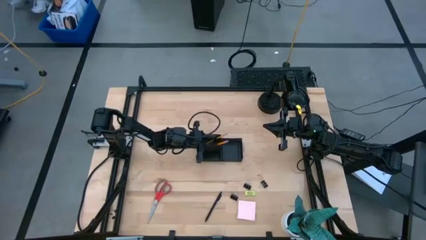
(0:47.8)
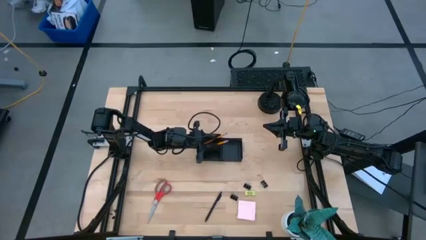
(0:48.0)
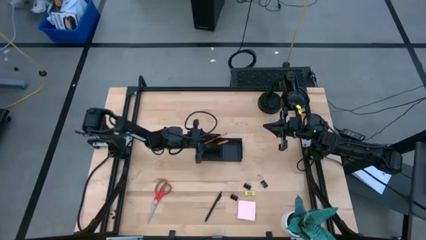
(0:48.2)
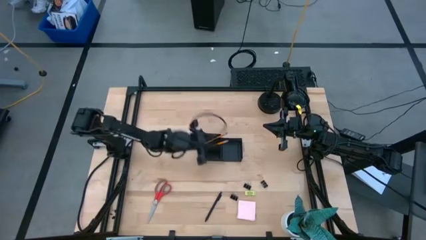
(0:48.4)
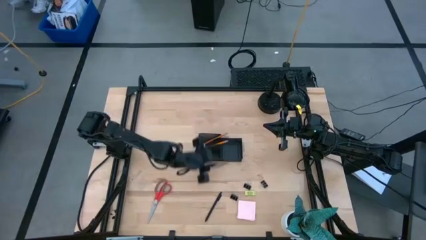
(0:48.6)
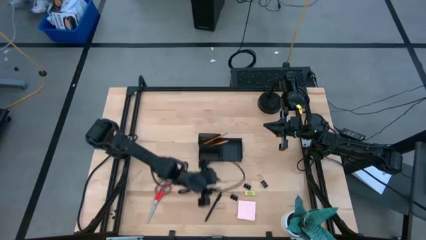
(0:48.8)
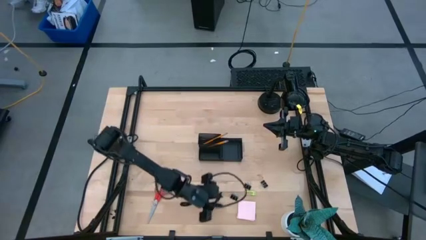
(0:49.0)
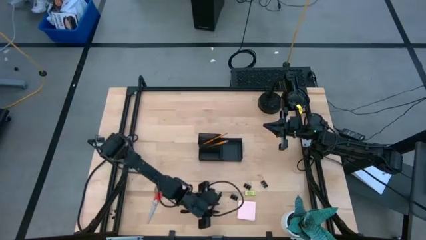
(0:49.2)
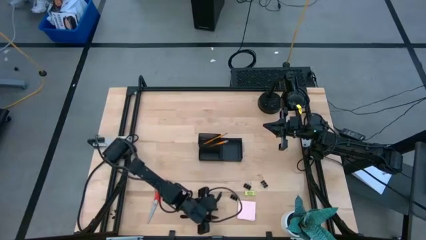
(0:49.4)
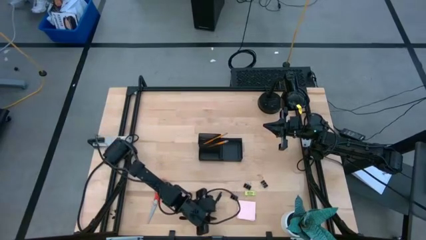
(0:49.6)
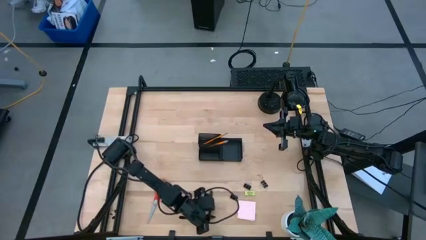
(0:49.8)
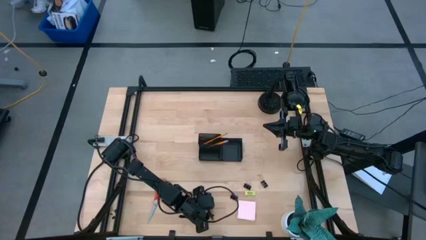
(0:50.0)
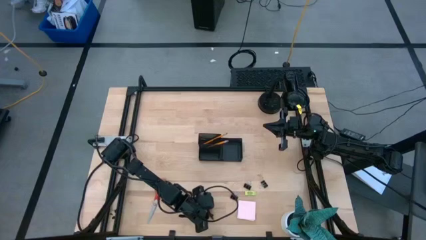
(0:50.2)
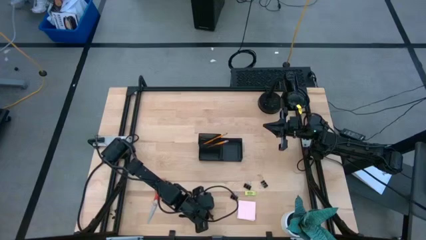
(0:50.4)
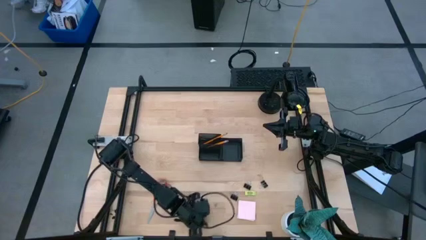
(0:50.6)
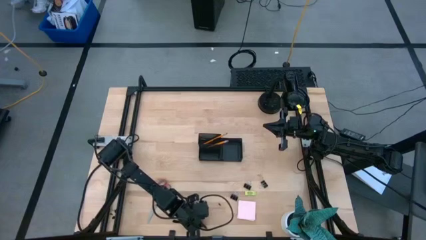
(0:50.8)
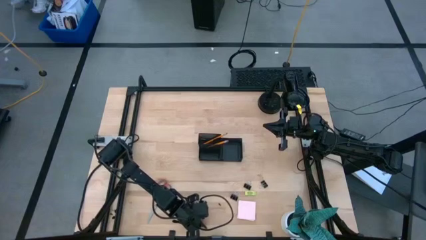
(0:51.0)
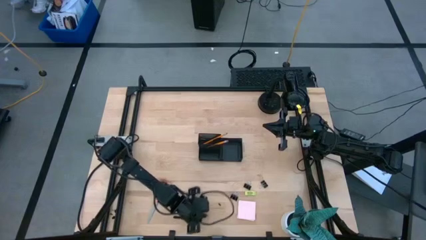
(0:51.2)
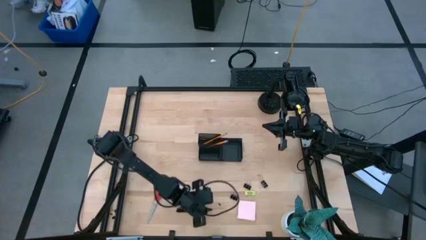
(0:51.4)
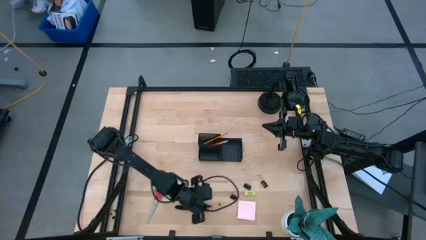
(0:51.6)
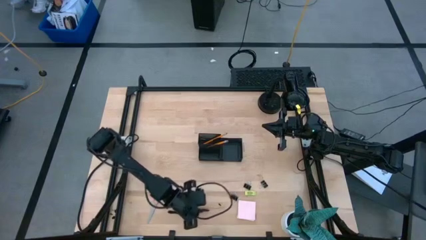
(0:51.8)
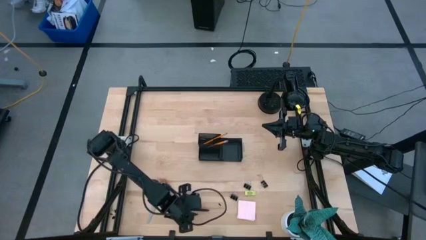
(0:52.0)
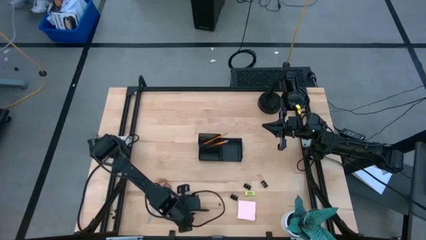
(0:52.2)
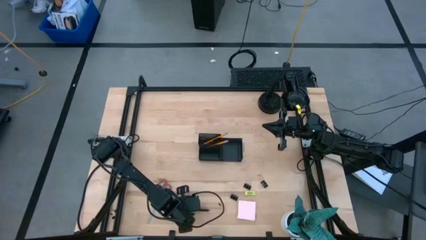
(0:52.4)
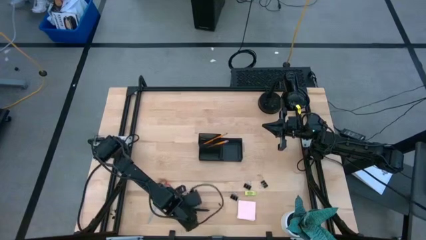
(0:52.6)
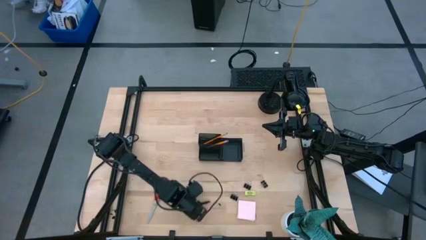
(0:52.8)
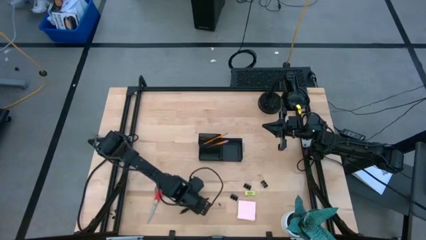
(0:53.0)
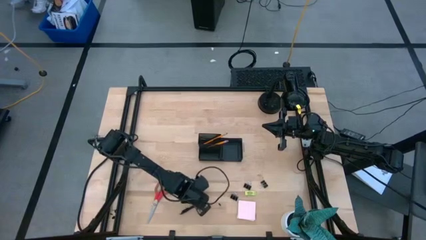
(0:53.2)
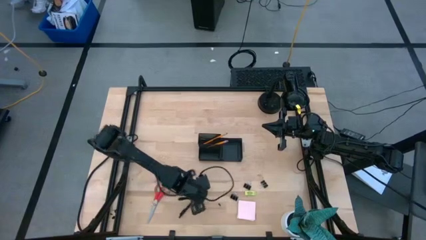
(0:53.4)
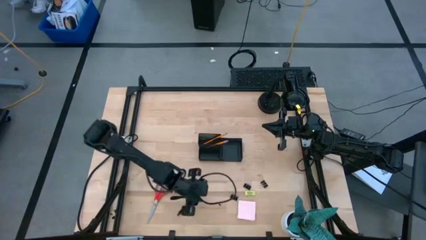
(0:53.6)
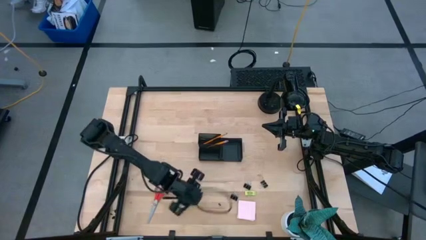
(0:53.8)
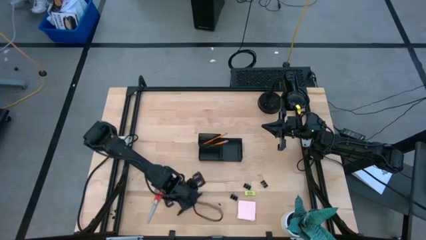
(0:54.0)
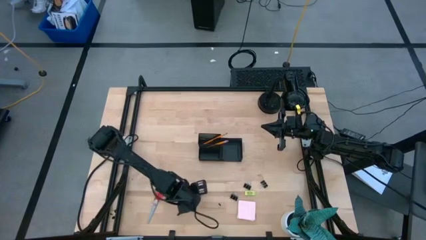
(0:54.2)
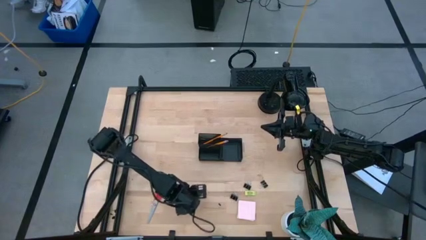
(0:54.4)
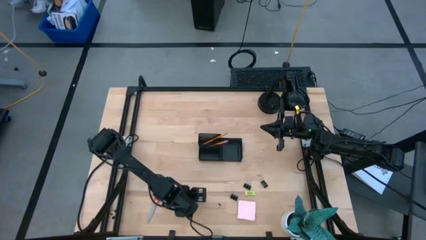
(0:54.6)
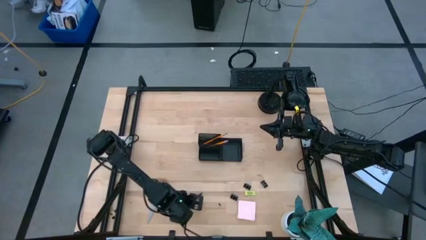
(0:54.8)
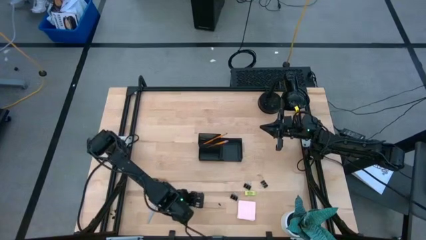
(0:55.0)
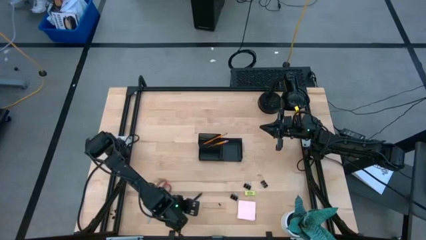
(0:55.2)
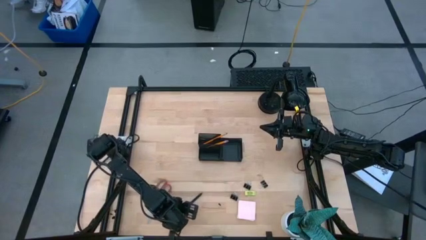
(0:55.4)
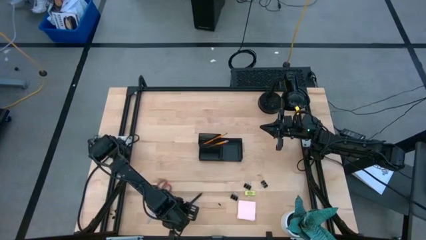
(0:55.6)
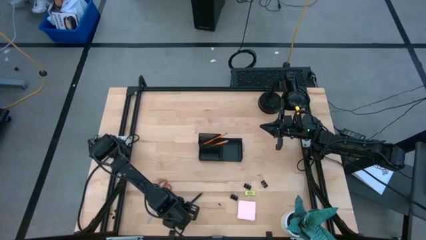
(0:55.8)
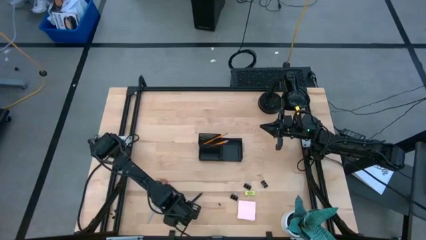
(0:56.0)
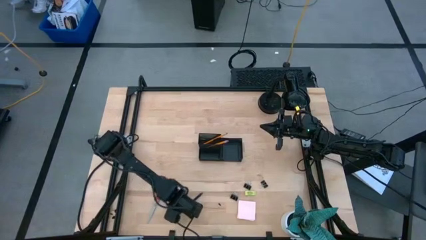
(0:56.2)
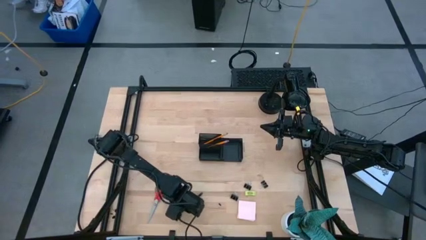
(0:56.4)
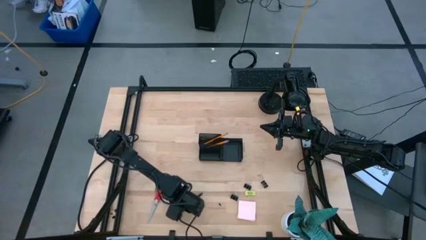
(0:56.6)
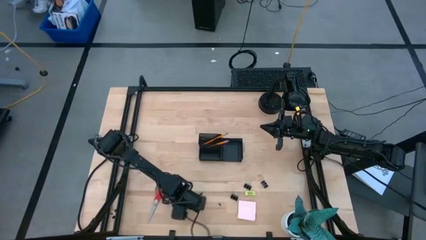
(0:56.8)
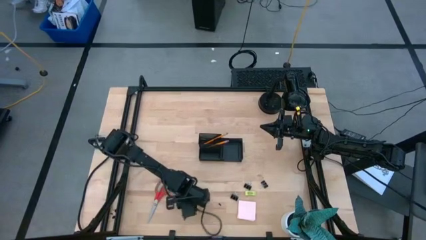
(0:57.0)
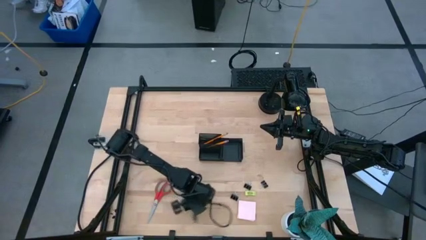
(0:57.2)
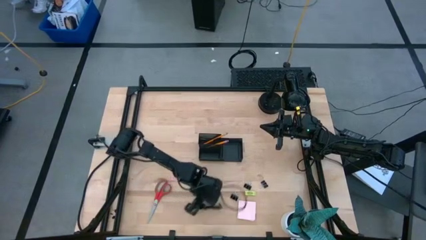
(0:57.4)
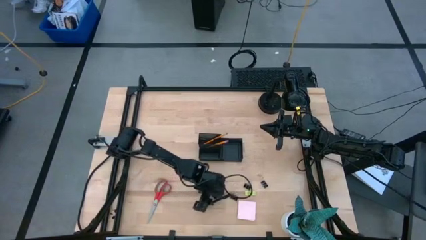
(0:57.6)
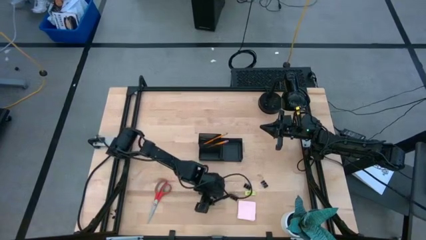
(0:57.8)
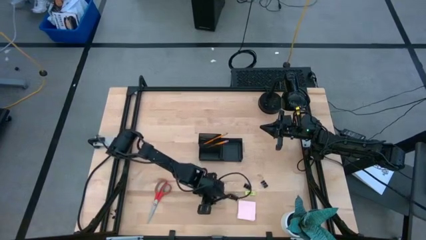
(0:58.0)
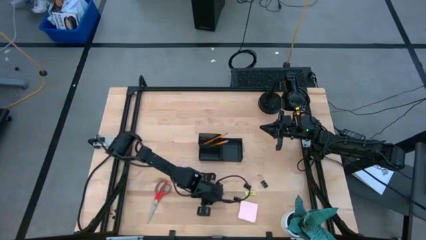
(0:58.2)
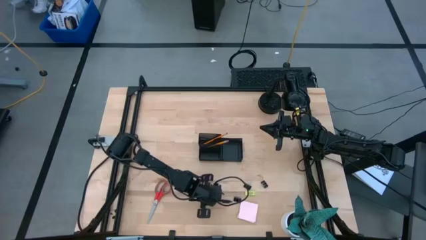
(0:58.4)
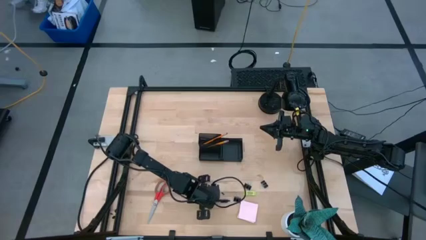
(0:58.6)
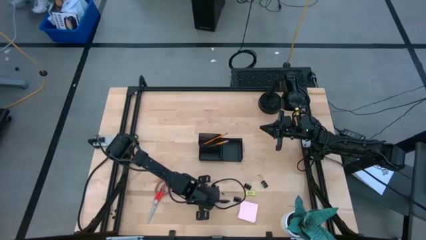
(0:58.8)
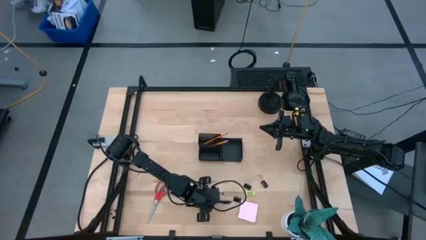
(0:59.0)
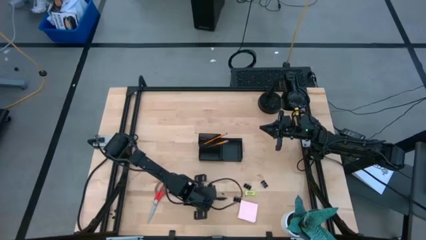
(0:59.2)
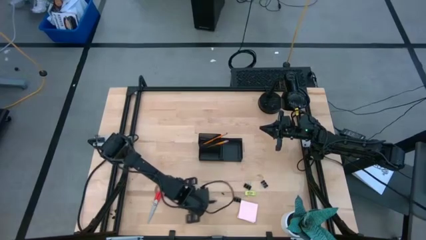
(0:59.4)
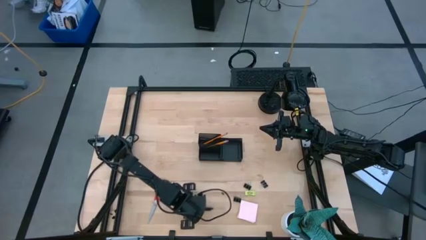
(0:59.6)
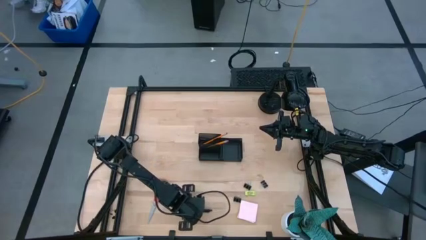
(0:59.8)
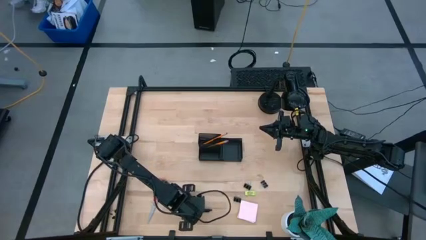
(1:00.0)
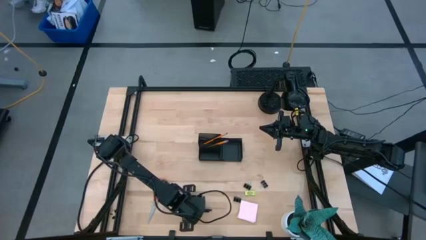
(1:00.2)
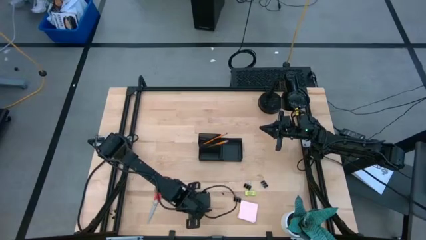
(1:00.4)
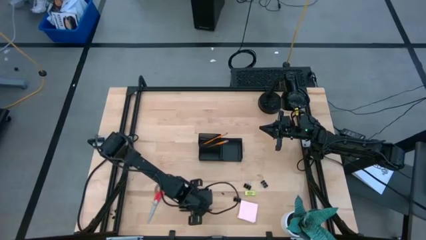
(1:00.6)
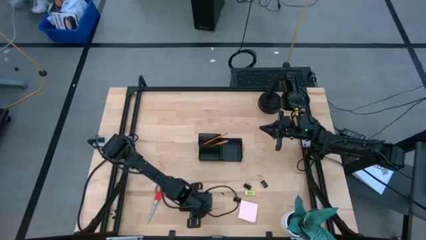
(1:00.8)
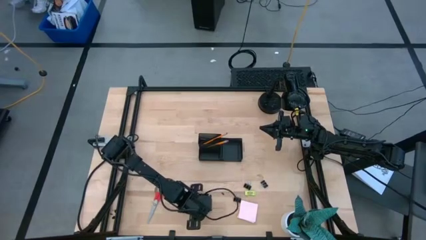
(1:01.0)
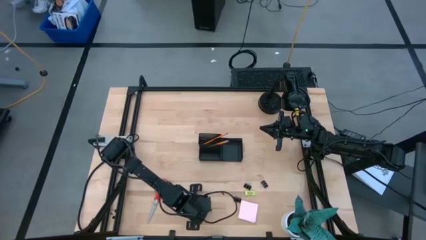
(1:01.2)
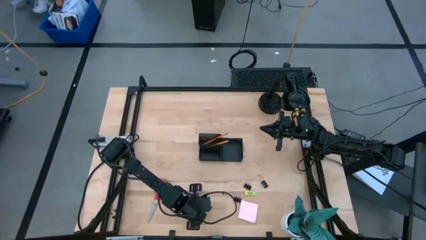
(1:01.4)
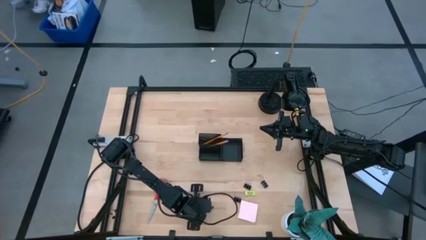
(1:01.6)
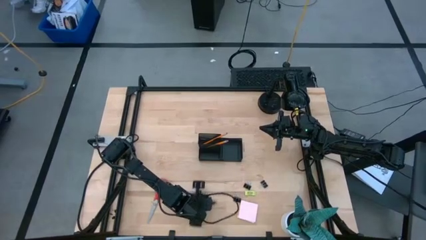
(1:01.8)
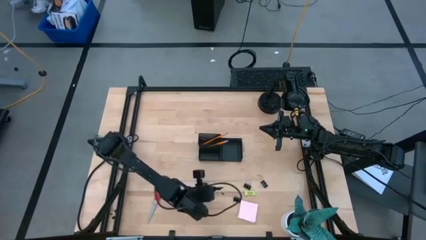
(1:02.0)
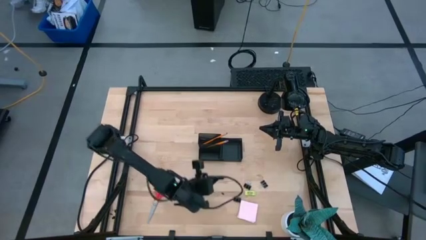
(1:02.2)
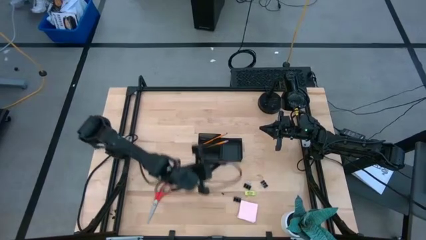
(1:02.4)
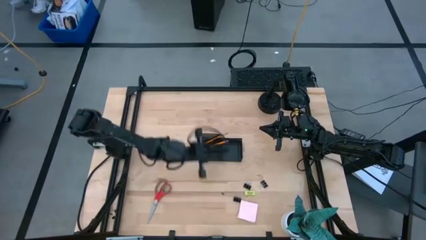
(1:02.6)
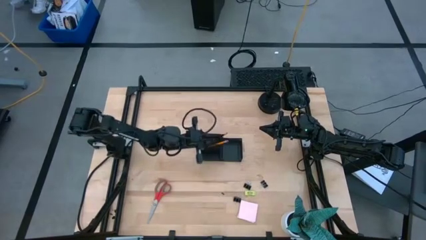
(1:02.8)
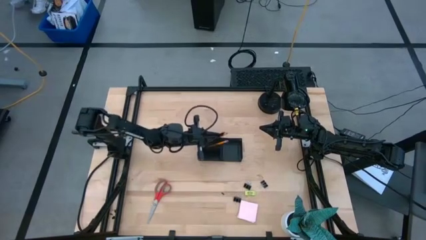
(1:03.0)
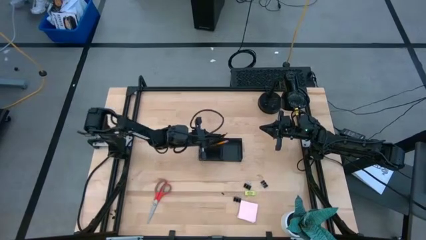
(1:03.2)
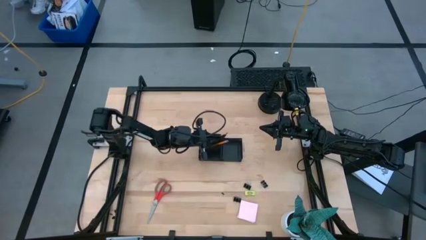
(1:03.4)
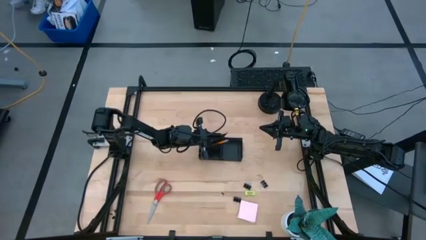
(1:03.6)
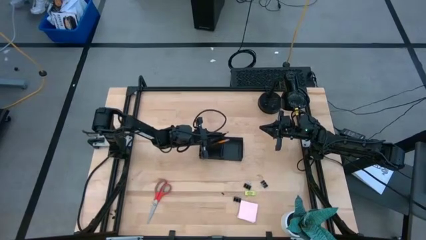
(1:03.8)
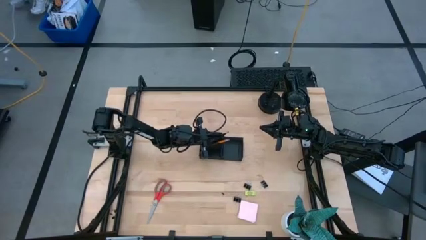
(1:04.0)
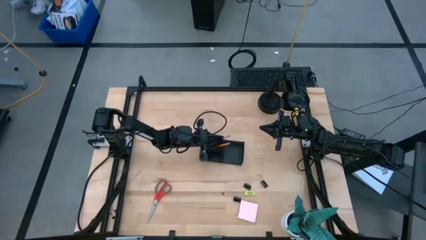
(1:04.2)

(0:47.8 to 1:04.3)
Task: Pick and place office supplies into organizer
Put the pen into the top left section of the desk organizer
